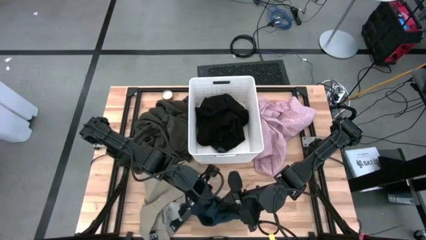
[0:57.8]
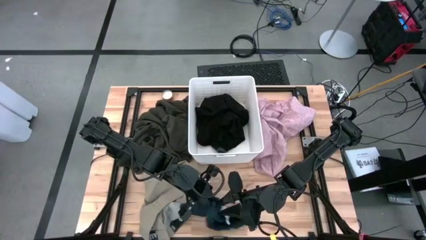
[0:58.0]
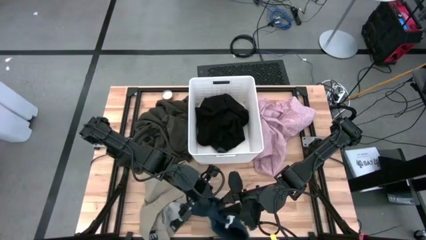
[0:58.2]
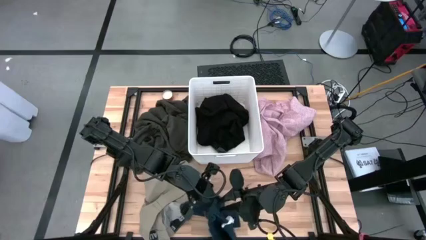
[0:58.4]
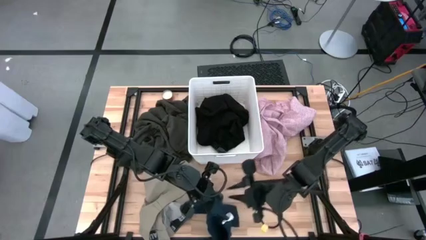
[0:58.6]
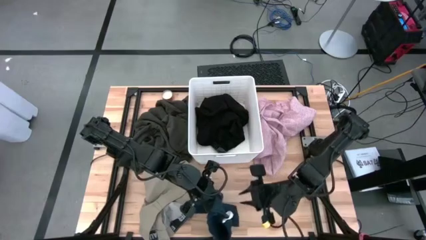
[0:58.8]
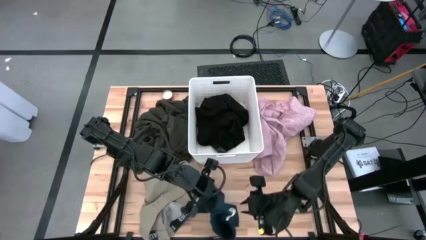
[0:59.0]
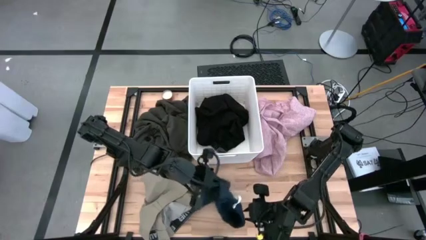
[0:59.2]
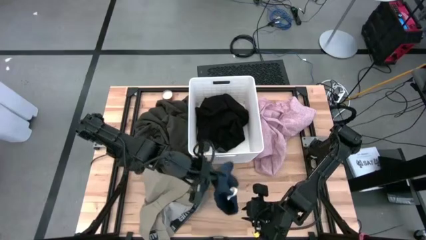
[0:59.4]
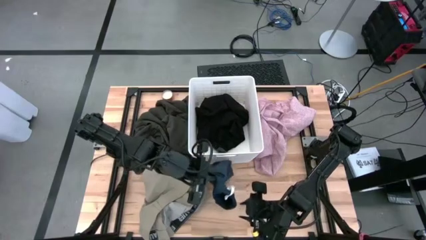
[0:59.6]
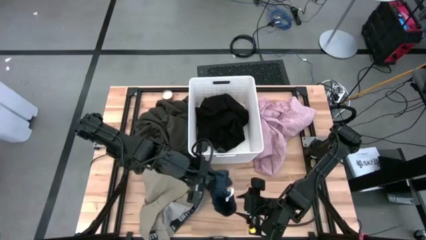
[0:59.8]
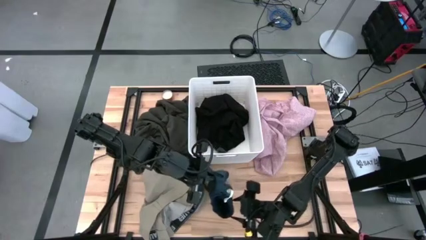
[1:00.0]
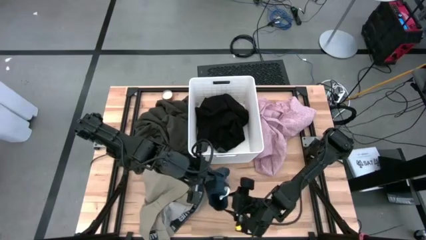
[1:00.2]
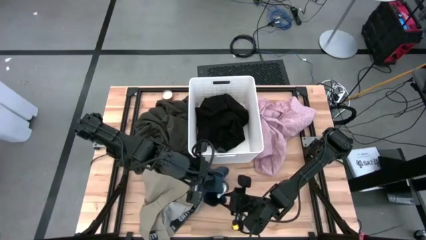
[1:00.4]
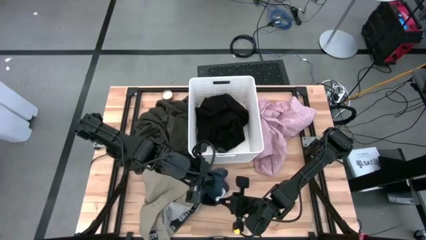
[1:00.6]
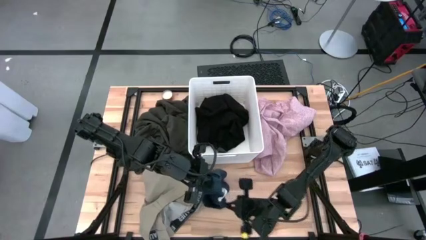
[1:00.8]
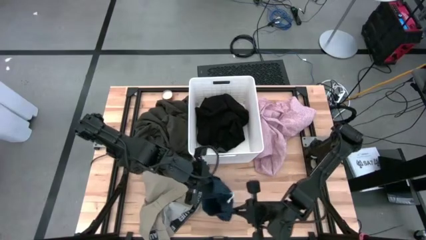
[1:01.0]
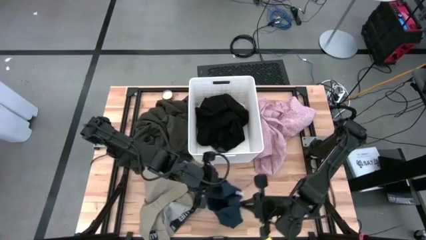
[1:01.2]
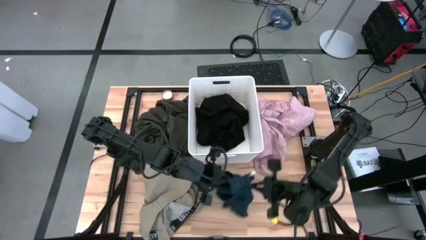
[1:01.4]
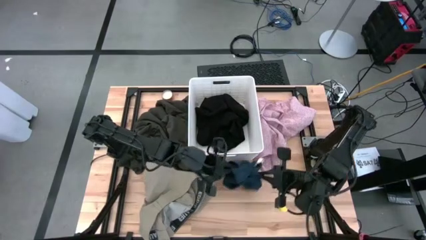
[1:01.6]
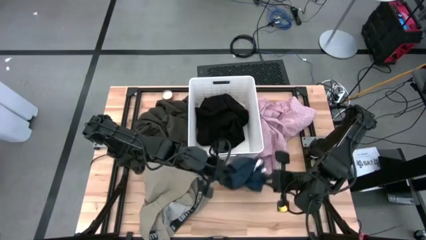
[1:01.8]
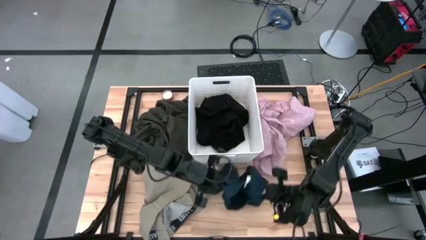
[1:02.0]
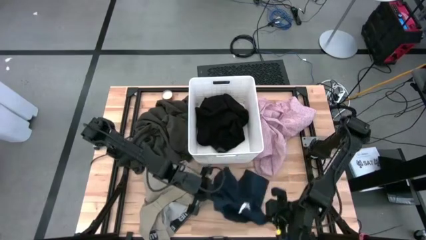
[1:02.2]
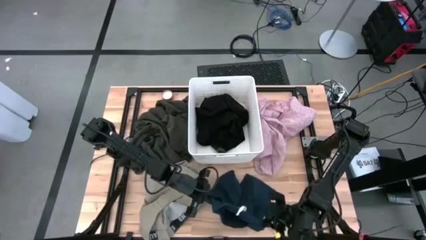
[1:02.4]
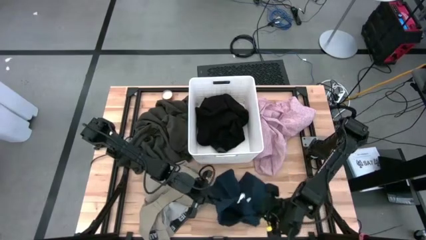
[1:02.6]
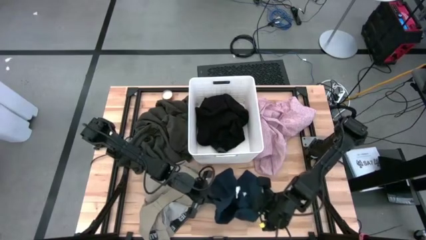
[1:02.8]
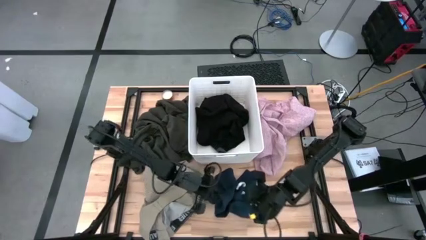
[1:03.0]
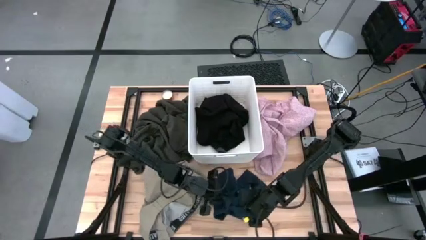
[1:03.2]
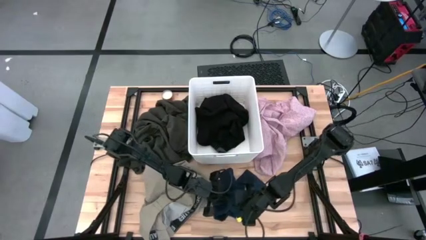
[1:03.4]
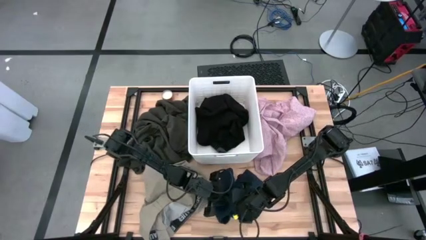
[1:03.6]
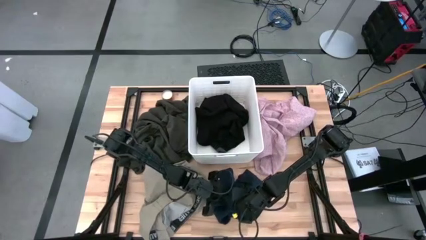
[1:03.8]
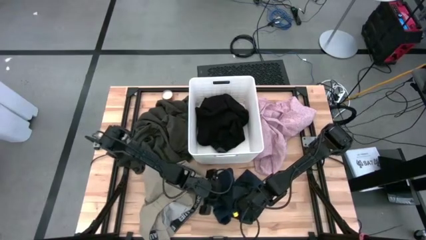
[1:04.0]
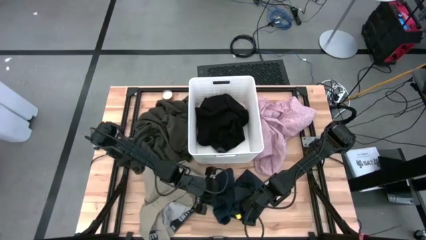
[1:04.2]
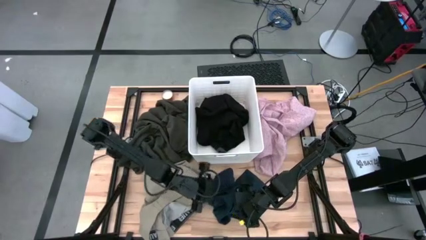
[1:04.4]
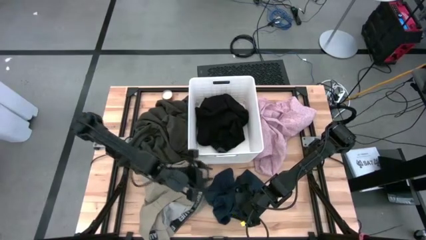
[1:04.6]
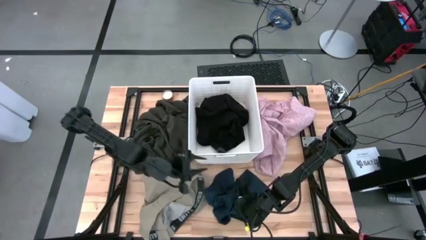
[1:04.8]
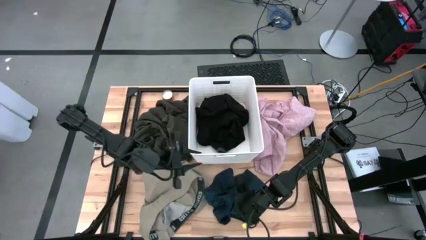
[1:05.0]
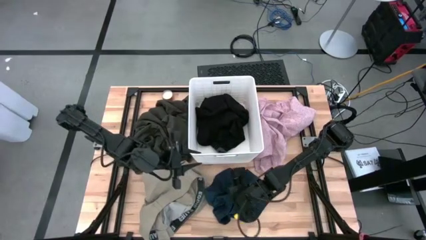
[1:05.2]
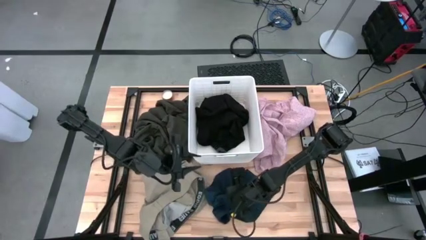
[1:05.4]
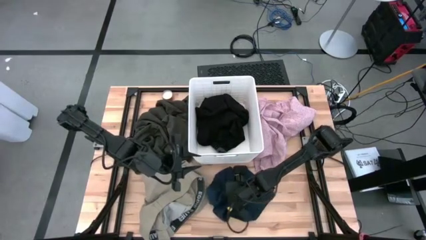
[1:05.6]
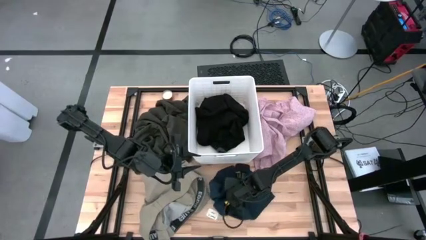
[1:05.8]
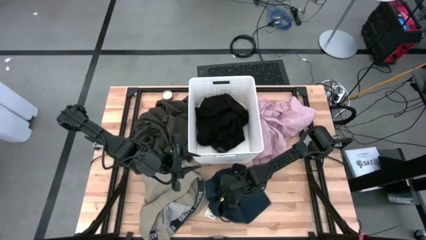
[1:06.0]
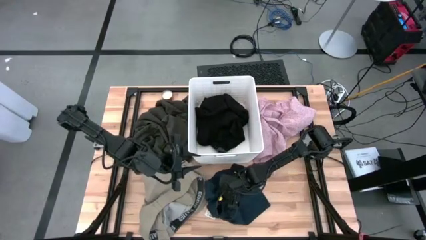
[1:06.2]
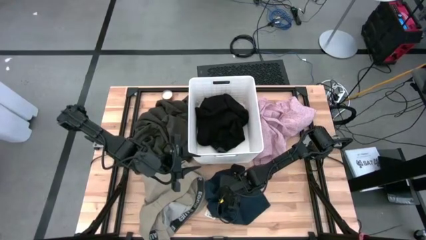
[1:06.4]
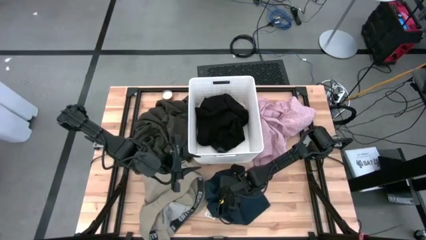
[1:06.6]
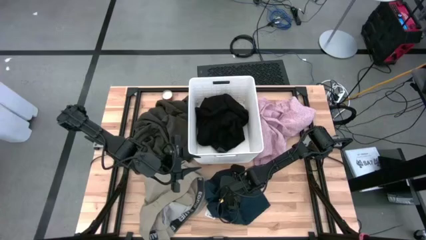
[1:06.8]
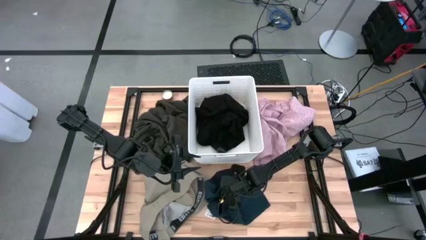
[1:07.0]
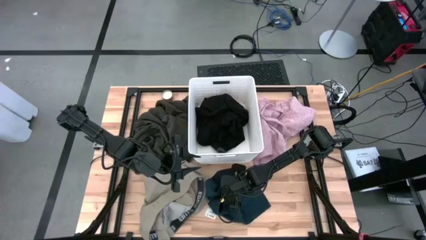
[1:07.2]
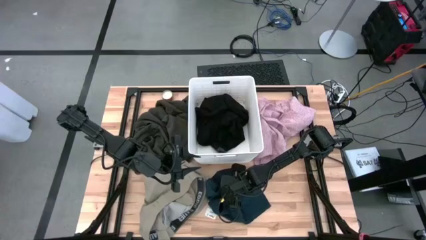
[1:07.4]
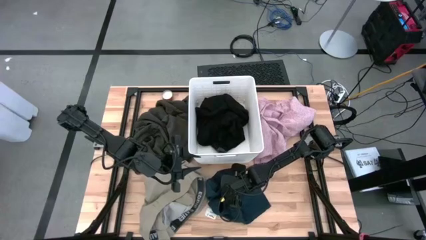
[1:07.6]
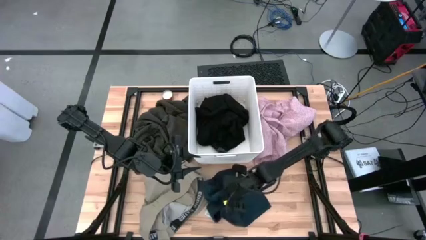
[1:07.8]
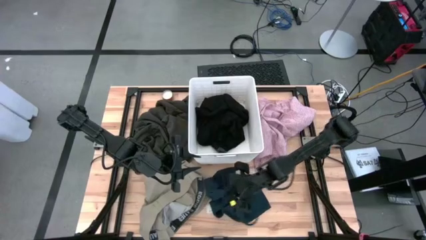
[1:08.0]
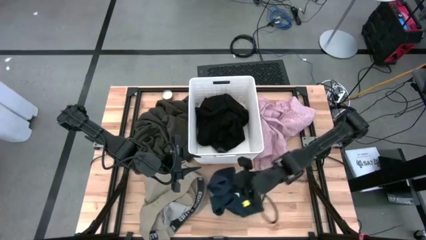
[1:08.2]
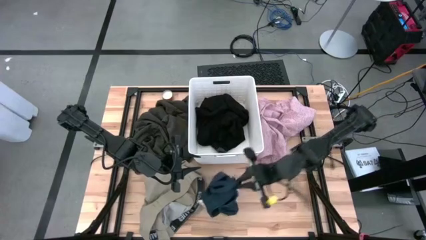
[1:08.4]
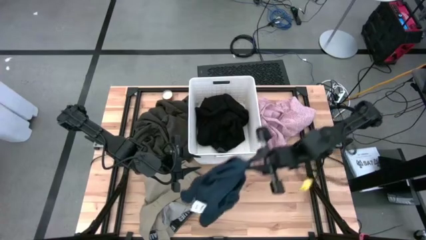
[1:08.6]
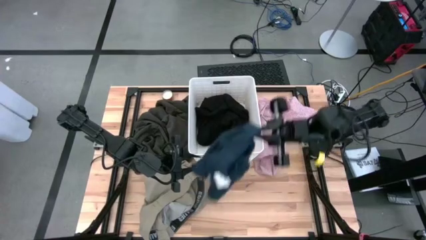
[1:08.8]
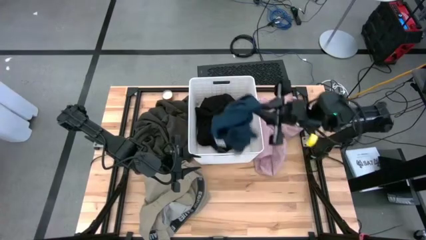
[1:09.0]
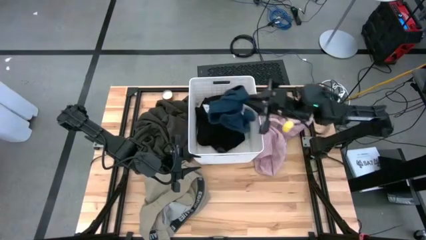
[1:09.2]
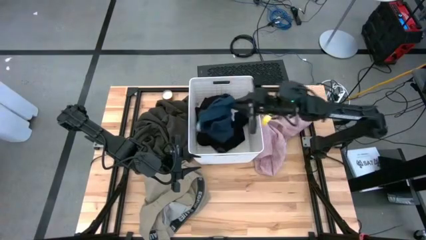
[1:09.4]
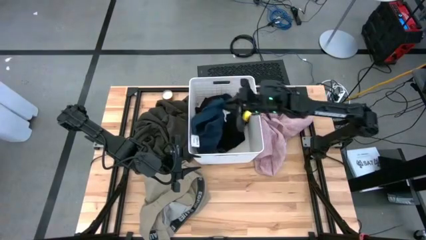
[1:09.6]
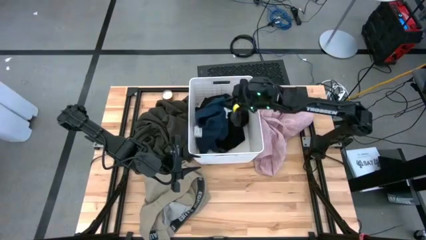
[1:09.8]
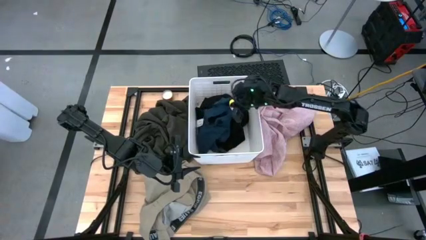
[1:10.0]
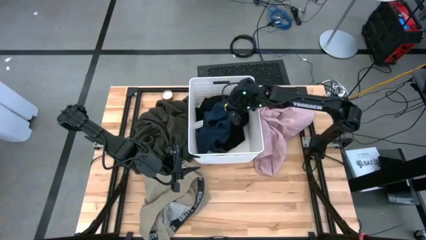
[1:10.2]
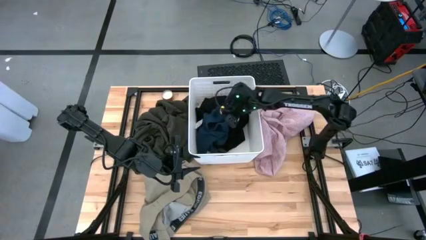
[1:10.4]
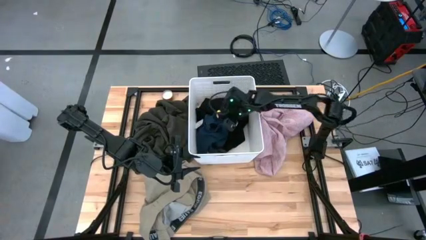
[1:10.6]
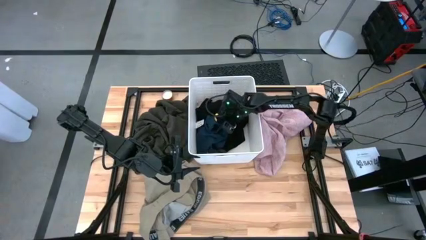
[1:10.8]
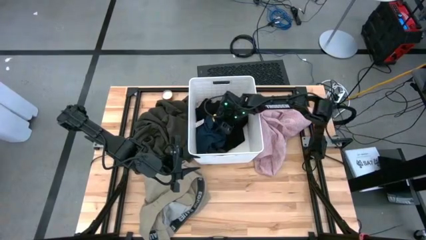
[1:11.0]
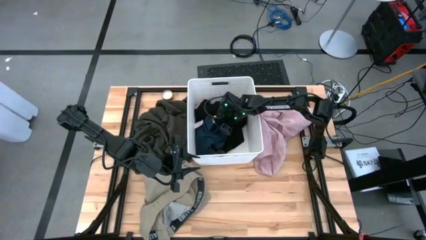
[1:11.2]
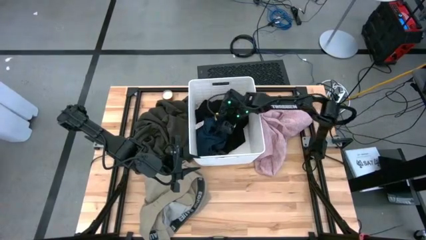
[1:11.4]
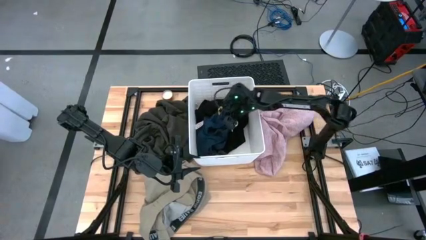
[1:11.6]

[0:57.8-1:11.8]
Task: Sort clothes
Put the blue shorts into the laundry bin

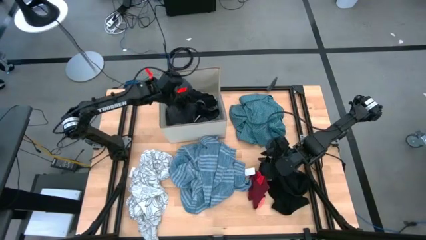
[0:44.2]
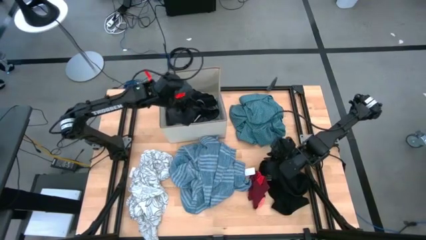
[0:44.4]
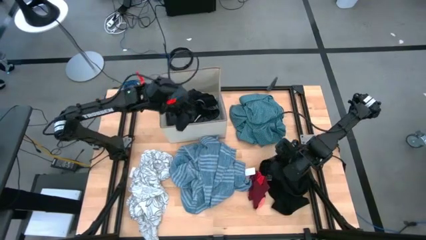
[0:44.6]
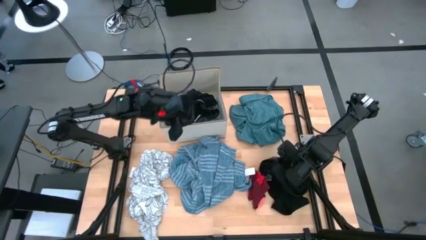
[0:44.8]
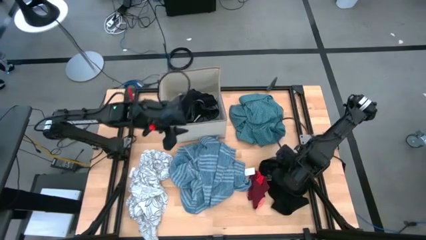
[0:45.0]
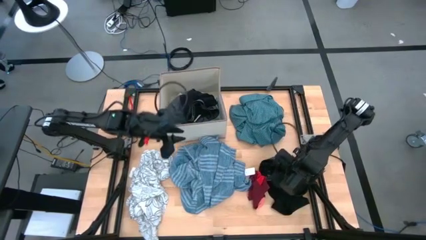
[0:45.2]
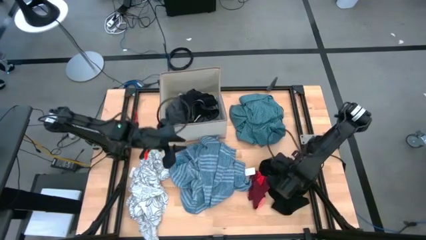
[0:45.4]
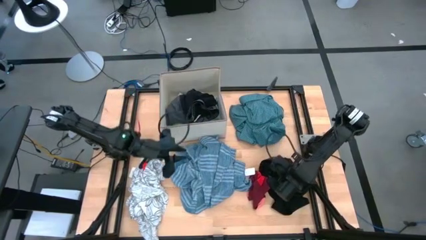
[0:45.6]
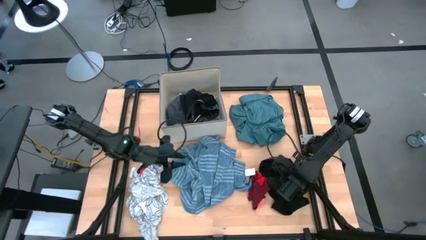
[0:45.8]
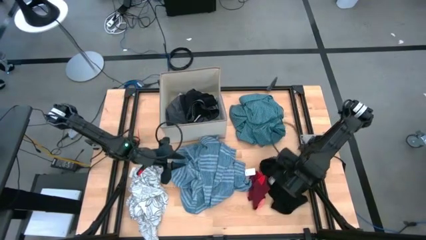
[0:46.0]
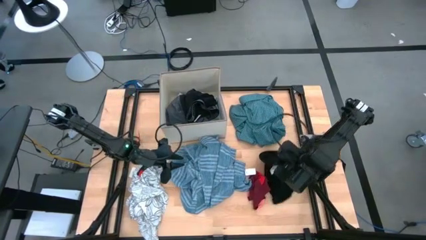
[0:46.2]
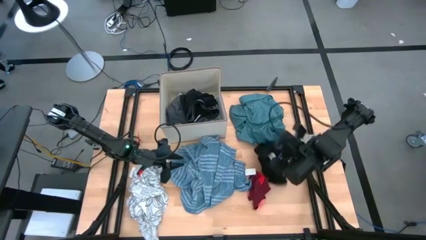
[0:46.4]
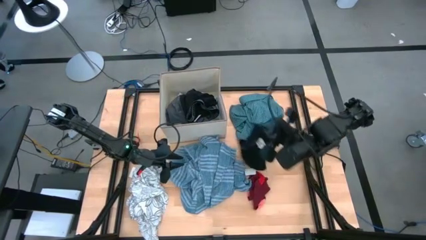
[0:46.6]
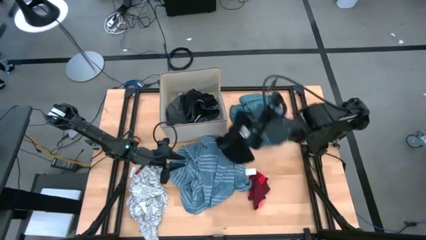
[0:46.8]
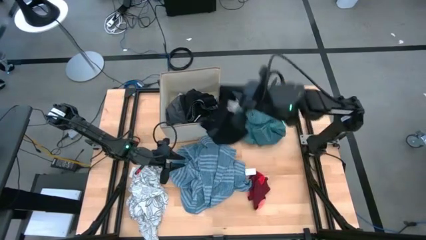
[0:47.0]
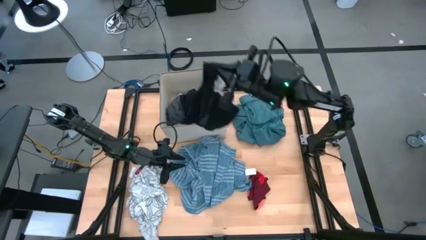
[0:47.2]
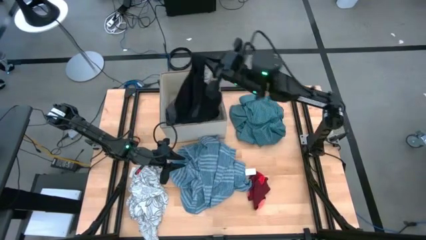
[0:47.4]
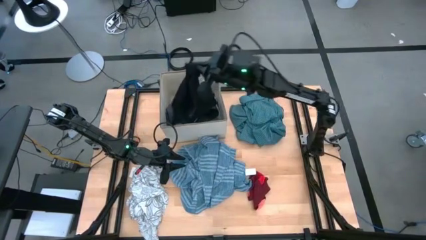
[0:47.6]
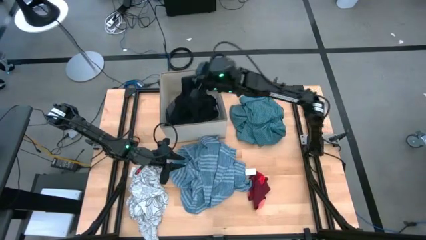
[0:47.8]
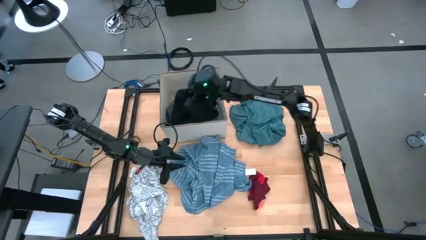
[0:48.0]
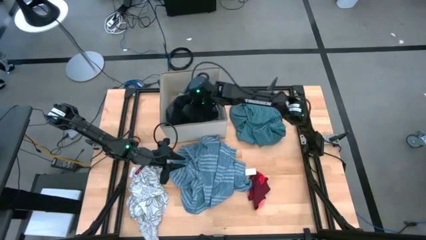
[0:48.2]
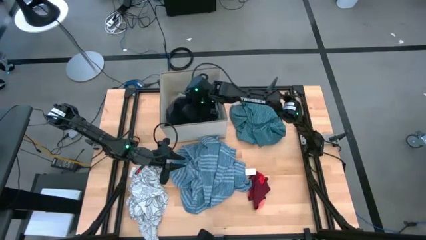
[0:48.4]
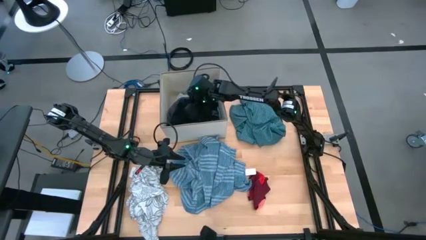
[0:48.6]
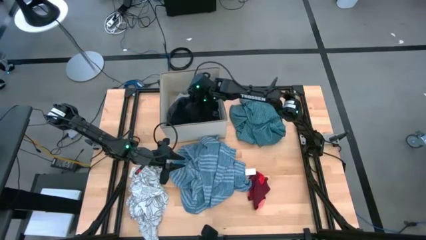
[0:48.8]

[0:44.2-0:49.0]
Task: Sort clothes
Put the black underwear into the white laundry organizer
